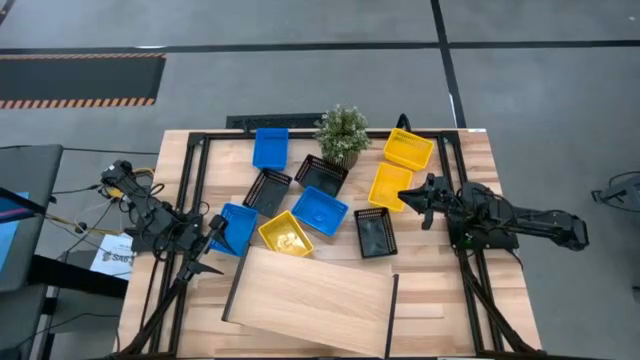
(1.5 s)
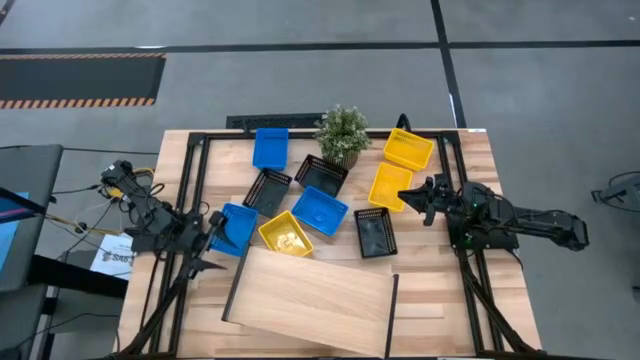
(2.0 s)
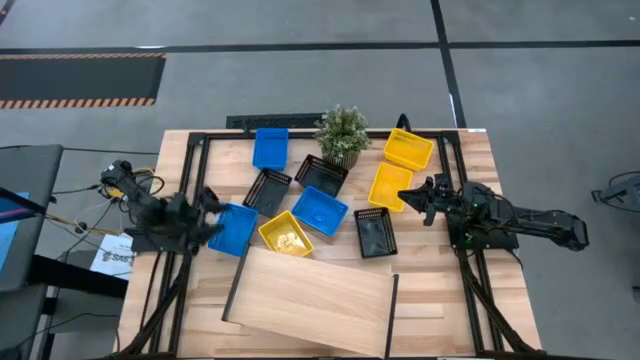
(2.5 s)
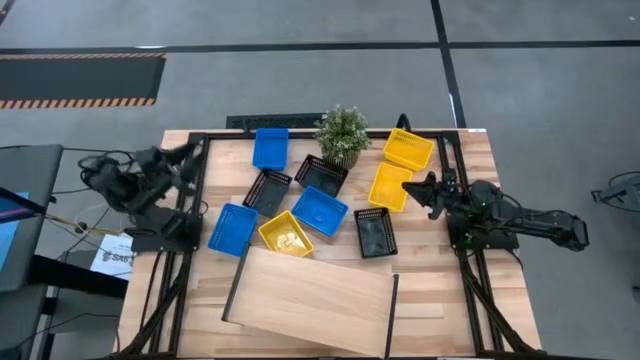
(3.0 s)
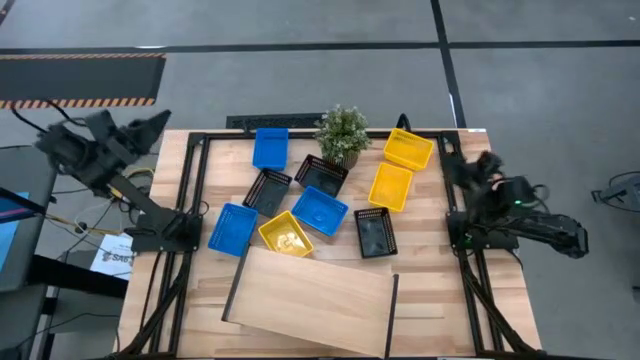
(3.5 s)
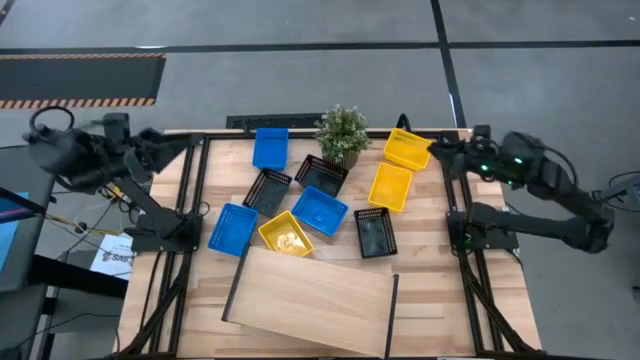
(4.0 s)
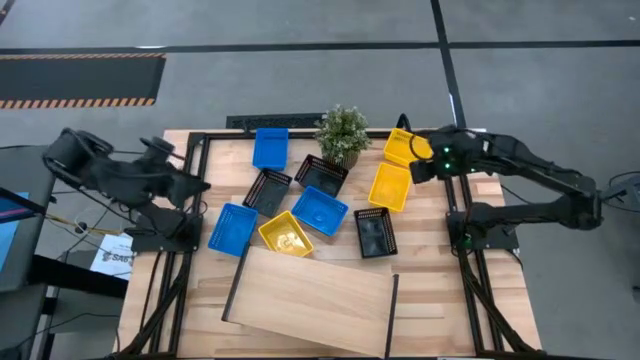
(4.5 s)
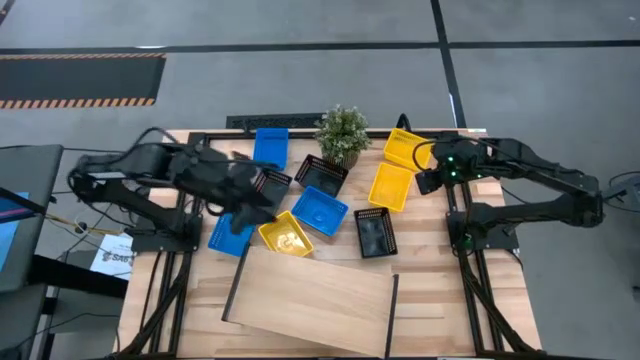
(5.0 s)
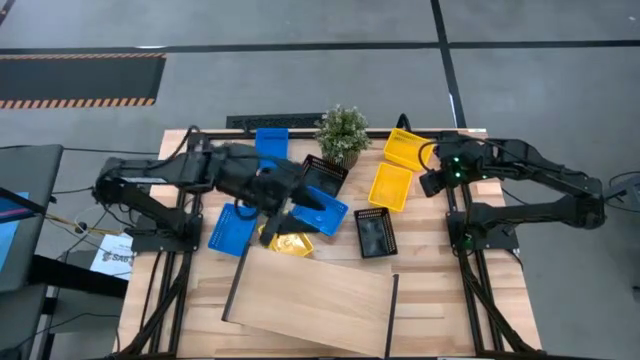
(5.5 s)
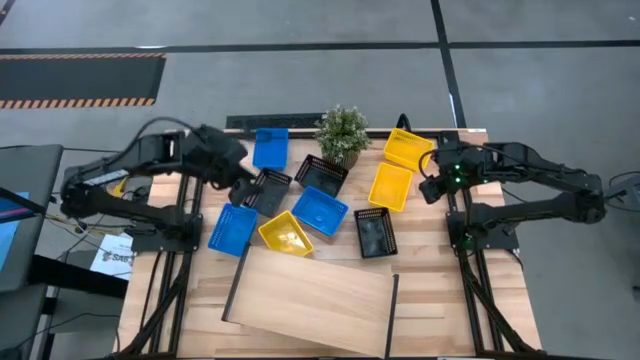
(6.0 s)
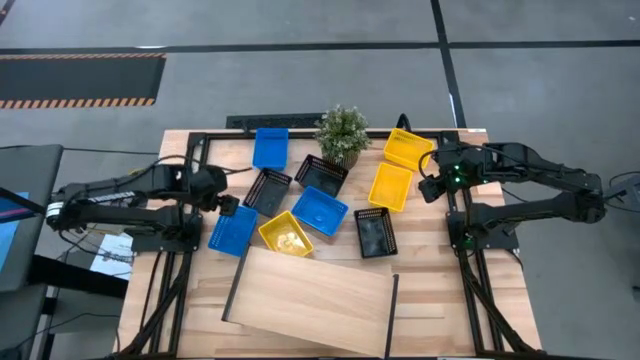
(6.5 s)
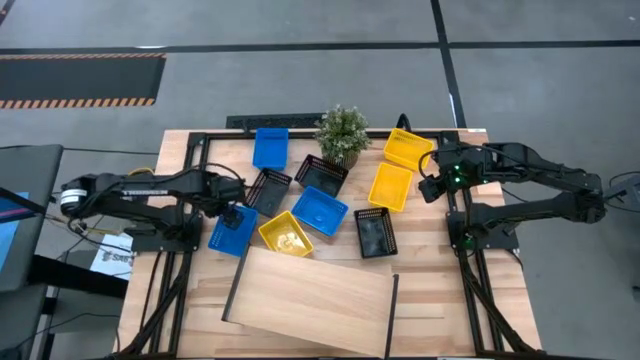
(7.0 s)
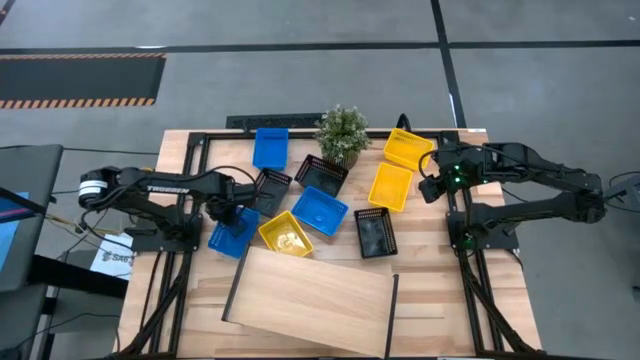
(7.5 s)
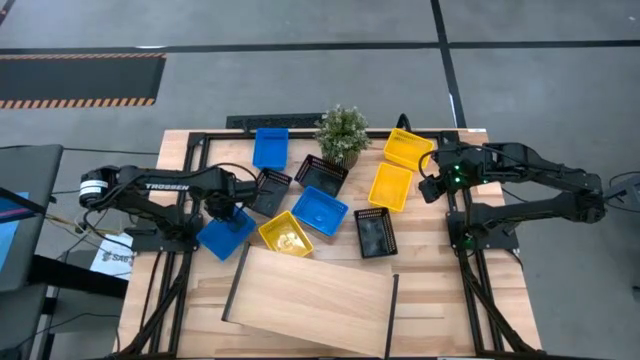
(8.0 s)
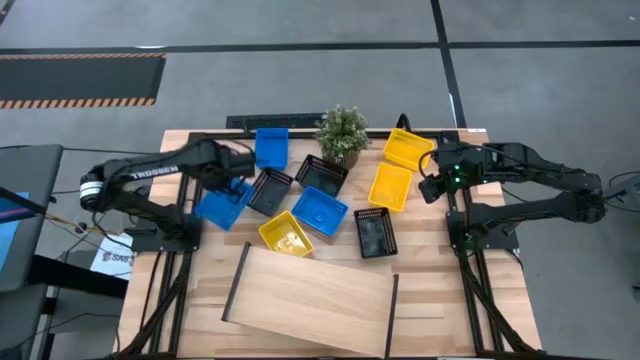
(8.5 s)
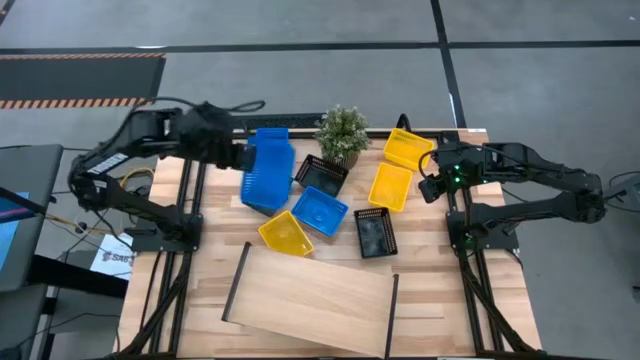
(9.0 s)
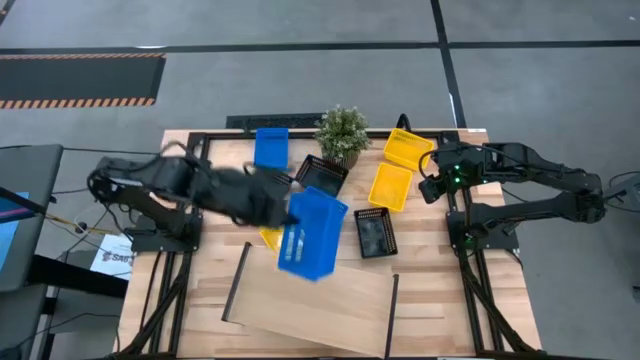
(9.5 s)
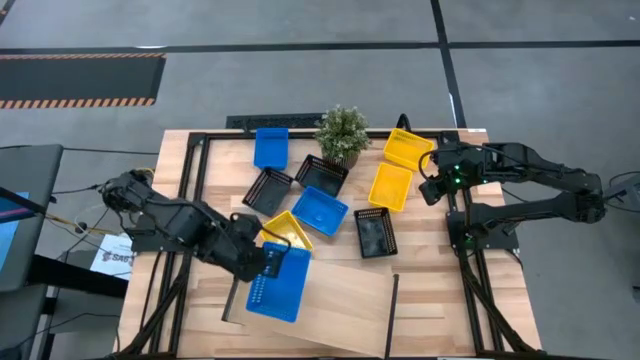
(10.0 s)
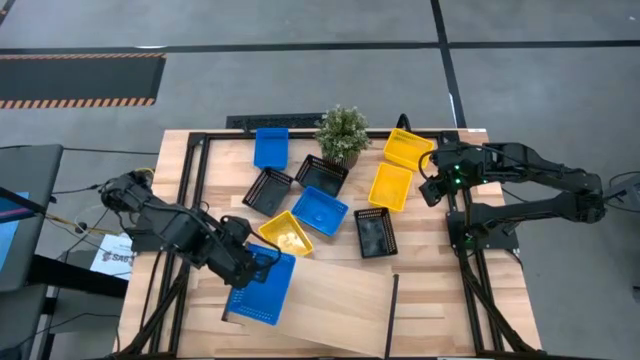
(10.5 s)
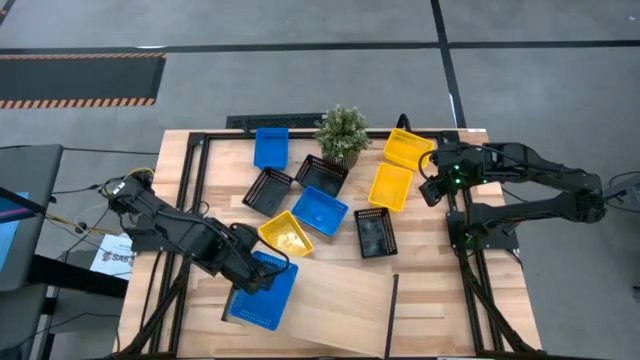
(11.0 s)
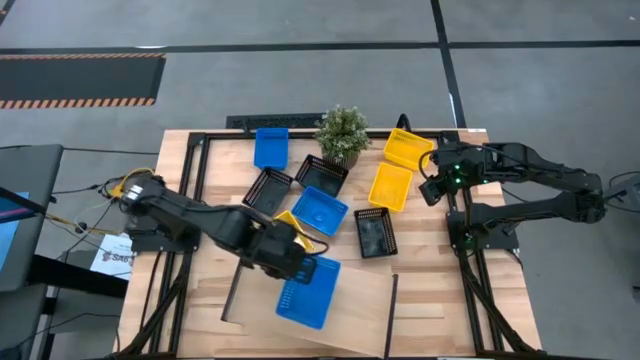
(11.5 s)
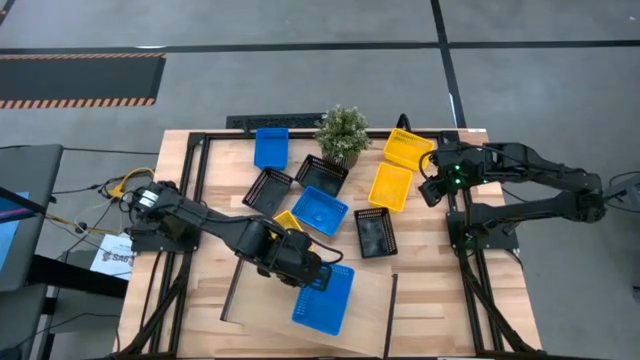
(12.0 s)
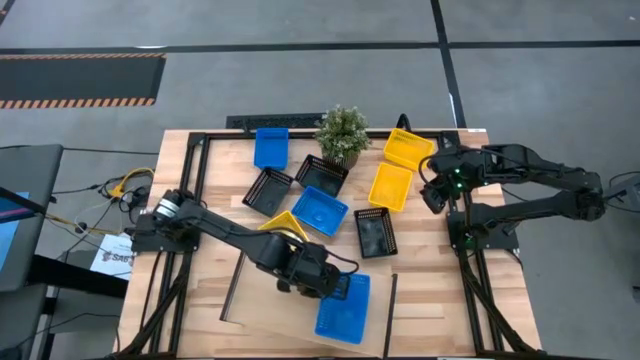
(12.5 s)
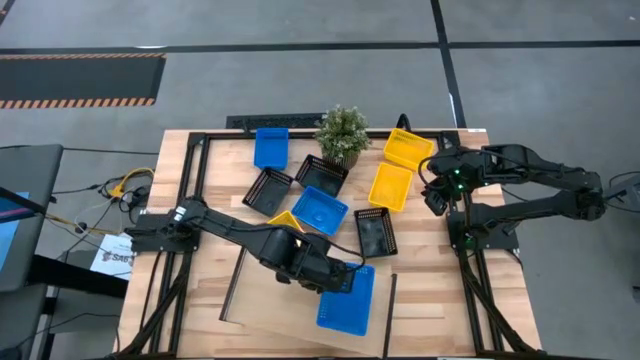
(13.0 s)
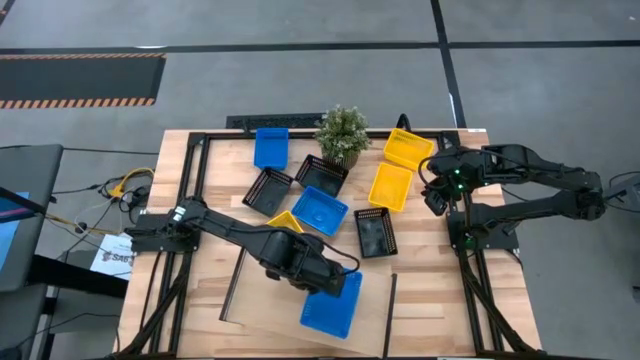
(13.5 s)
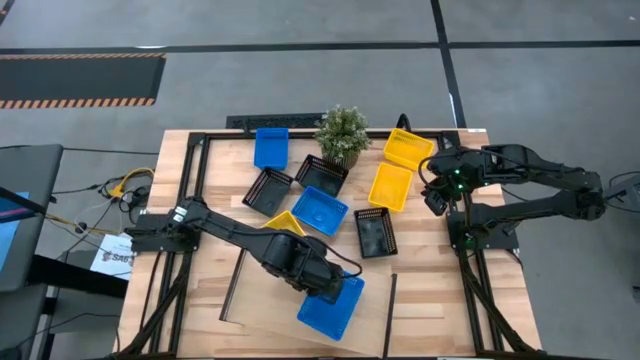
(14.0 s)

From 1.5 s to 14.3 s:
Task: Stack baskets on shelf by color
Put the bottom left blue bin on the shelf

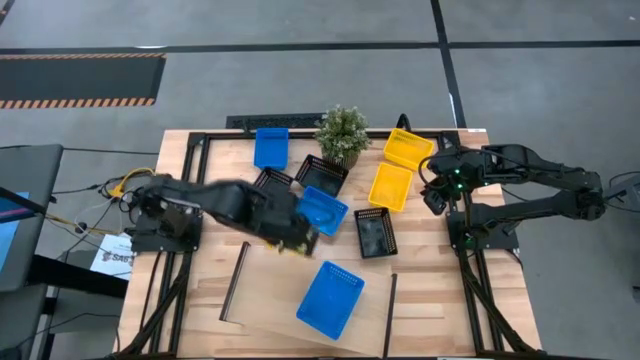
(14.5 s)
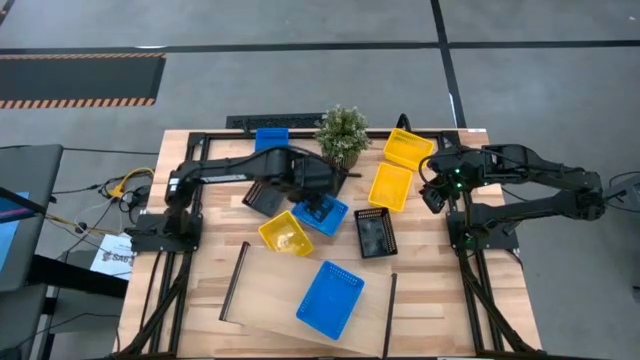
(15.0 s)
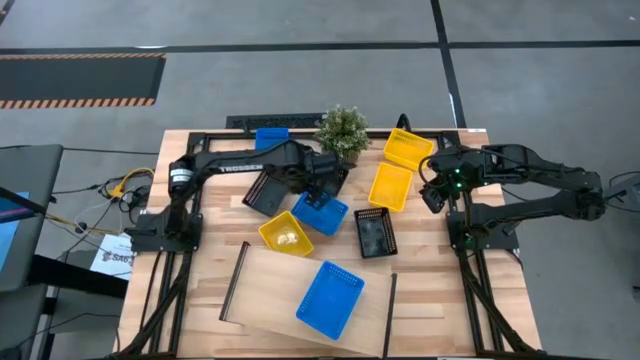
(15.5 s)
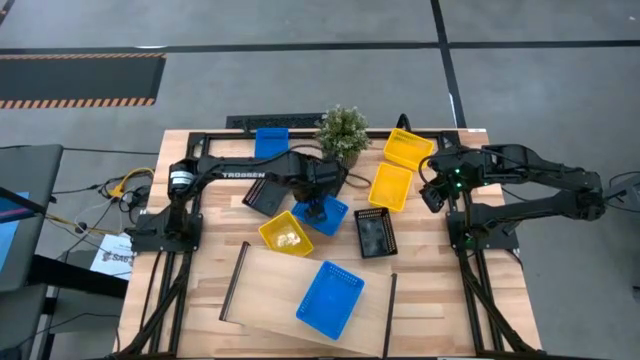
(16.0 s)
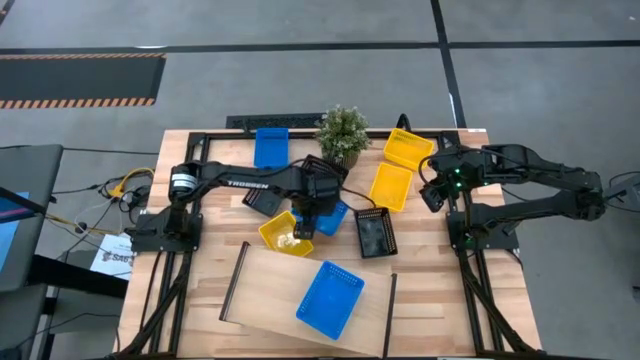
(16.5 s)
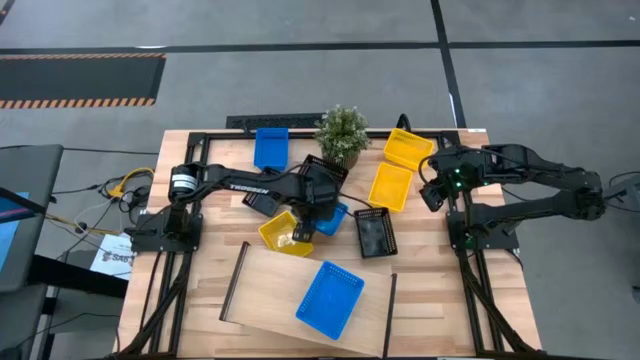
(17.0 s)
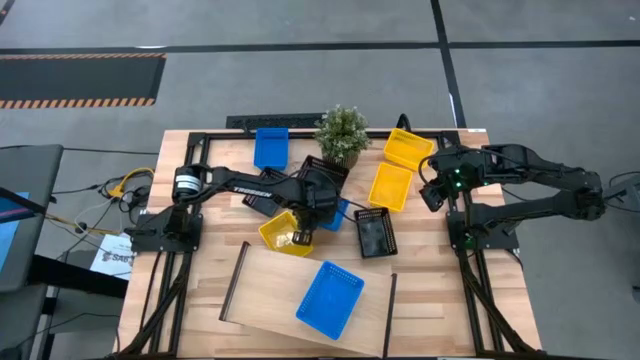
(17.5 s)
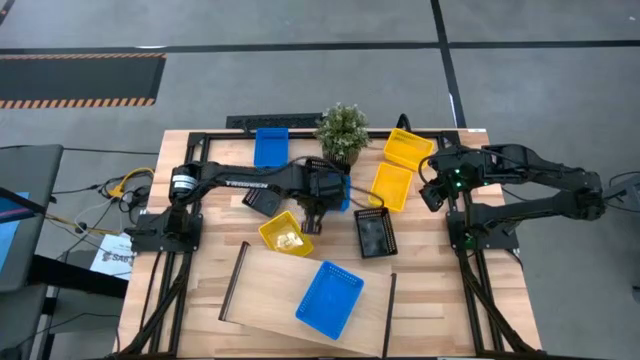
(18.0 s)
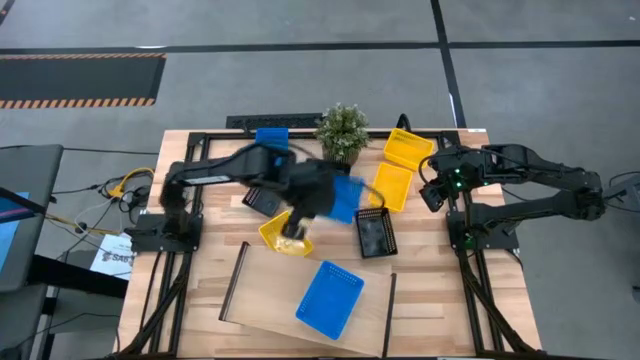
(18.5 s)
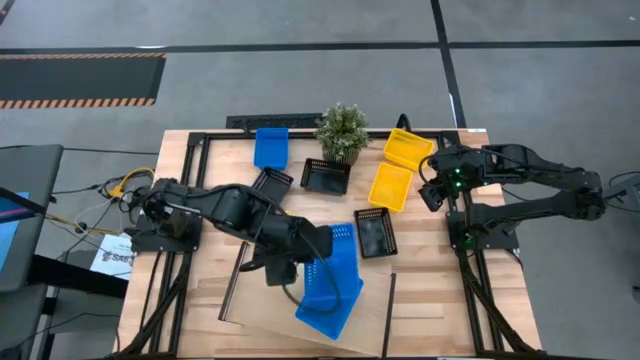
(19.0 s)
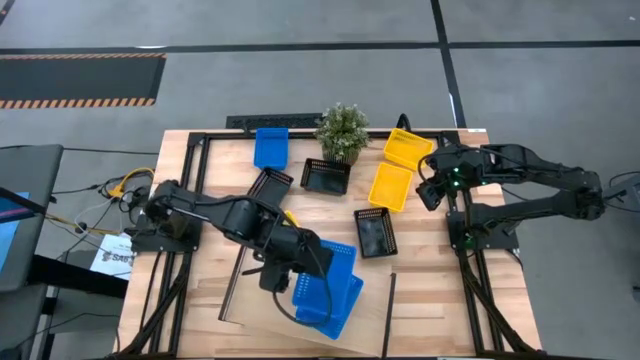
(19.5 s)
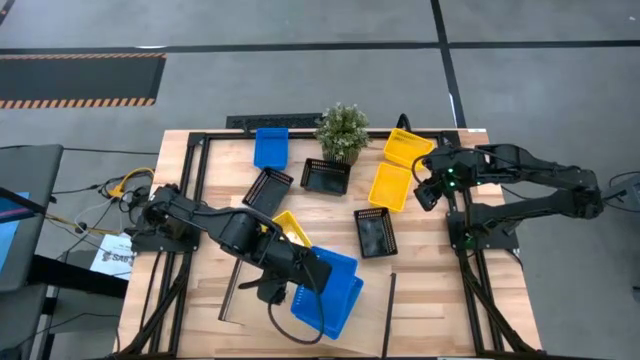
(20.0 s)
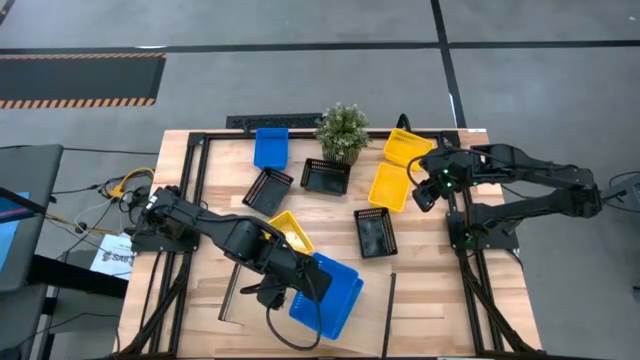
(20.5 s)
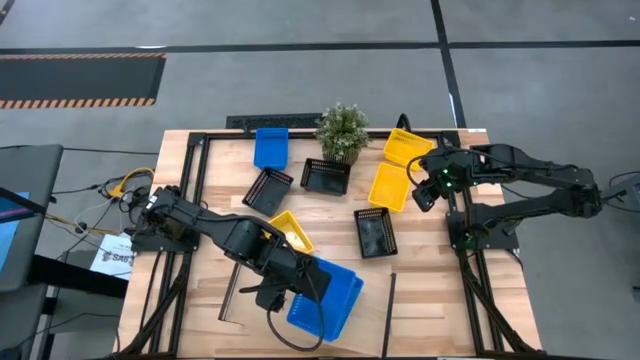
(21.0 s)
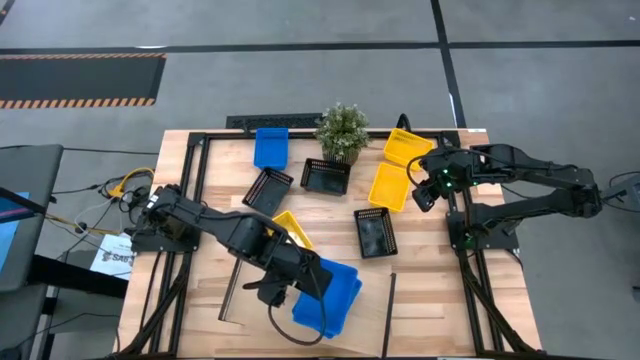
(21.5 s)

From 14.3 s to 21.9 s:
Stack the bottom blue bin on top of the blue bin on the shelf

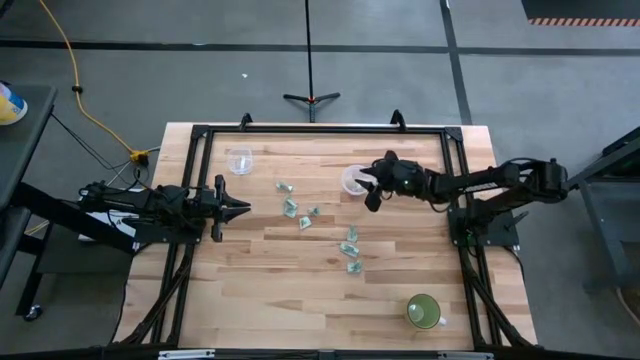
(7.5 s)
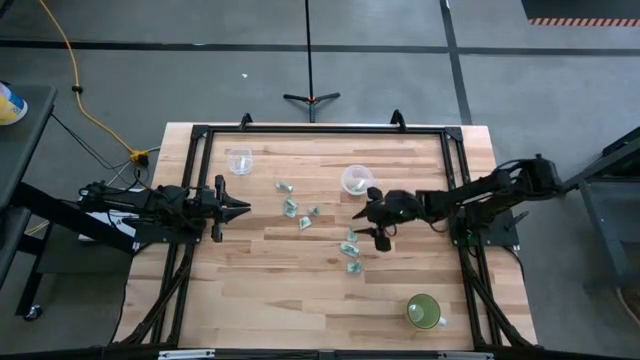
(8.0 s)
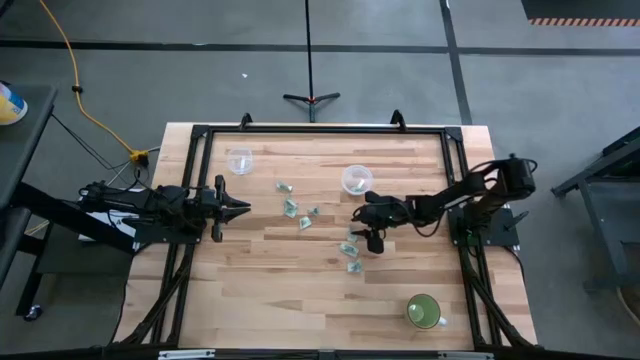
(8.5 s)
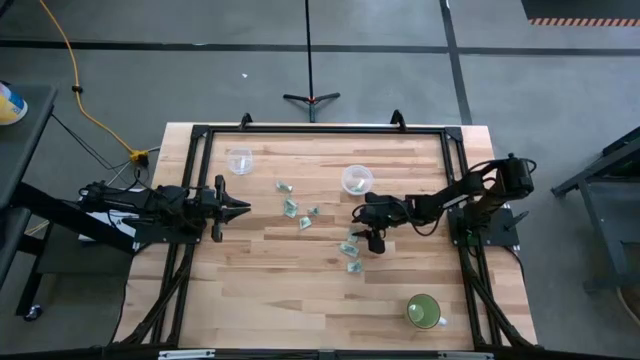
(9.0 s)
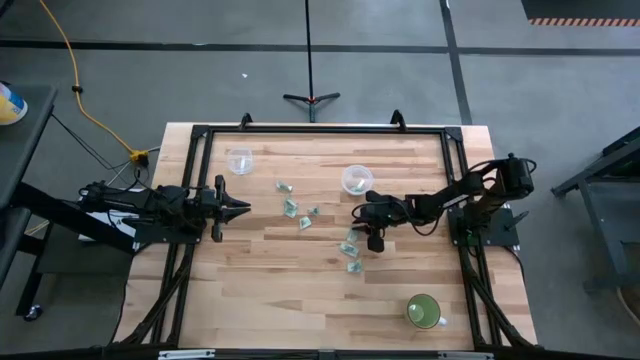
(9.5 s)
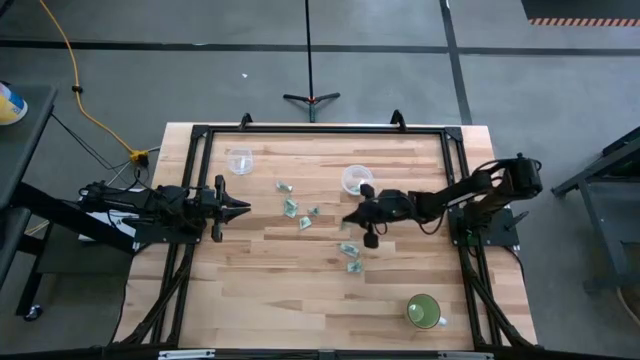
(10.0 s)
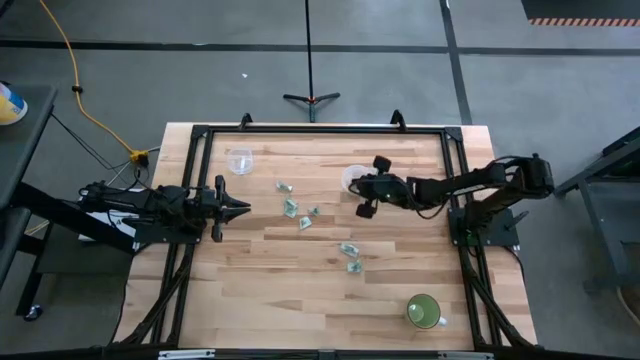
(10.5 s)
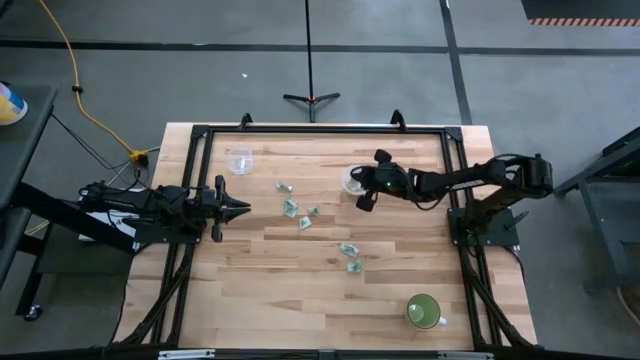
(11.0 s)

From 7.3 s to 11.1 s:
Task: Pick and place Stevia / Truvia into bins
Put the stevia packet into the bottom transparent container
